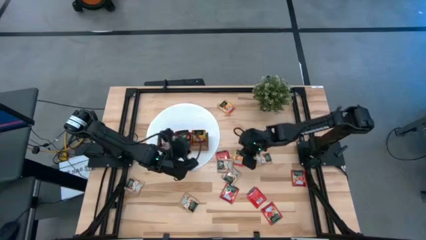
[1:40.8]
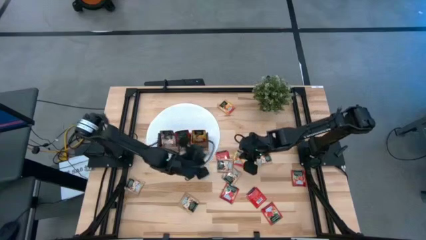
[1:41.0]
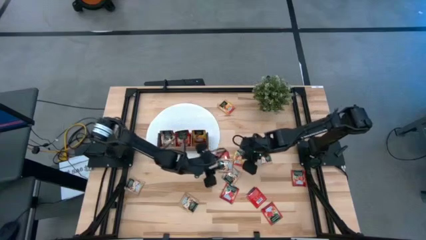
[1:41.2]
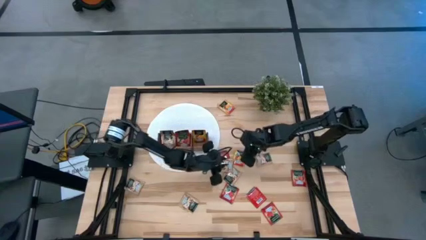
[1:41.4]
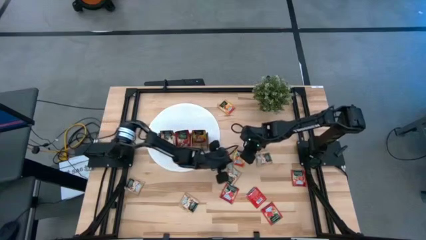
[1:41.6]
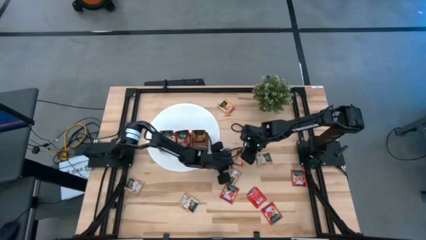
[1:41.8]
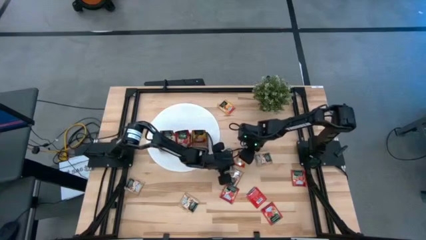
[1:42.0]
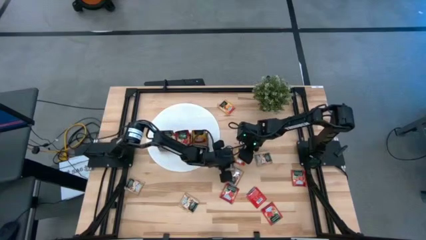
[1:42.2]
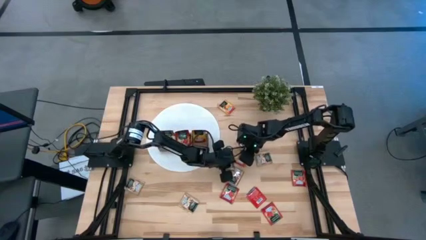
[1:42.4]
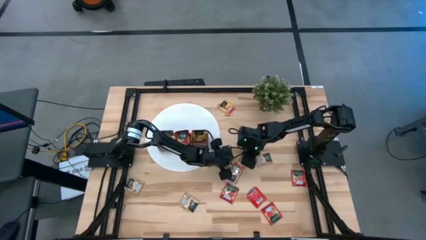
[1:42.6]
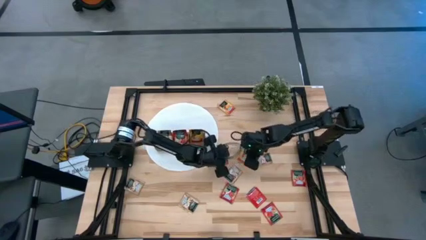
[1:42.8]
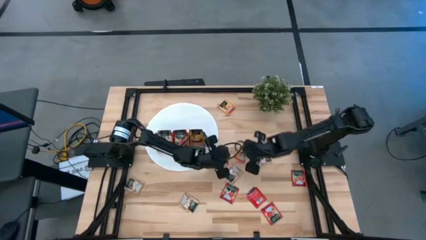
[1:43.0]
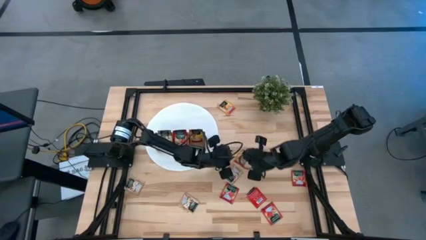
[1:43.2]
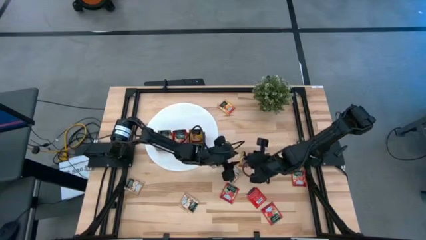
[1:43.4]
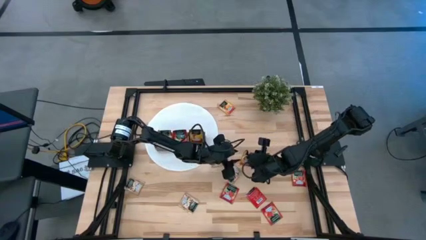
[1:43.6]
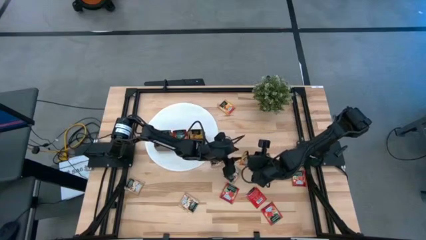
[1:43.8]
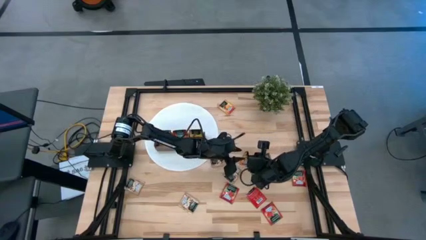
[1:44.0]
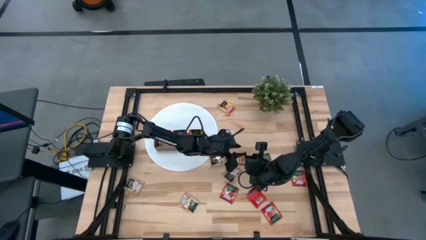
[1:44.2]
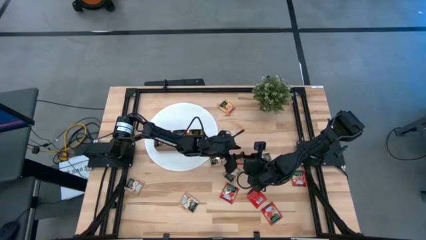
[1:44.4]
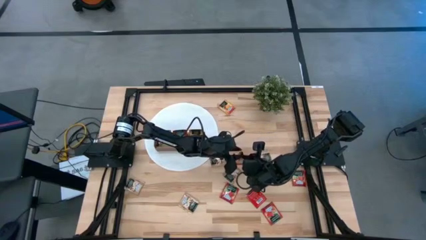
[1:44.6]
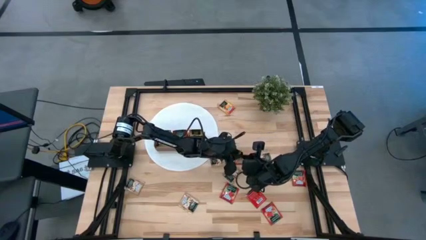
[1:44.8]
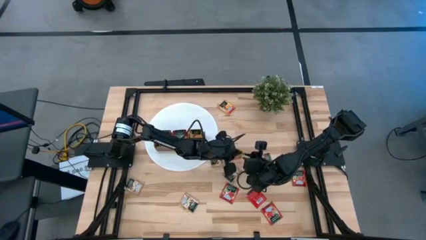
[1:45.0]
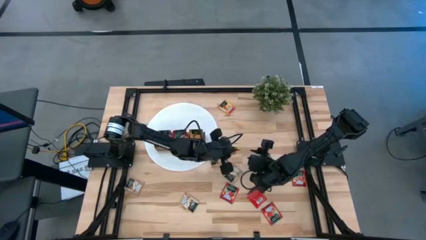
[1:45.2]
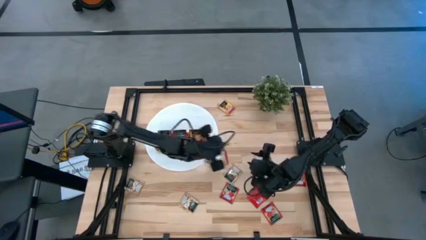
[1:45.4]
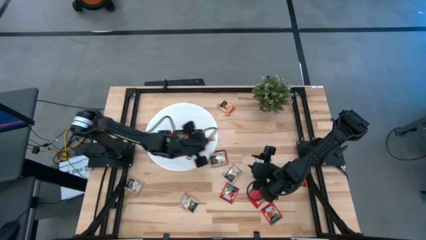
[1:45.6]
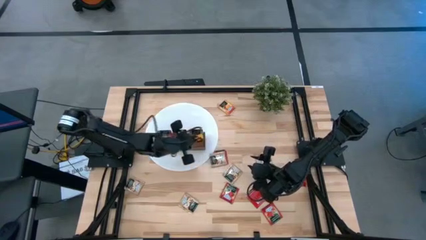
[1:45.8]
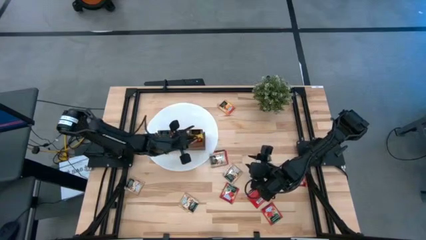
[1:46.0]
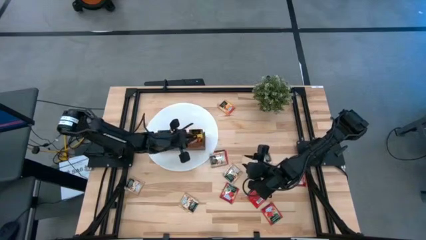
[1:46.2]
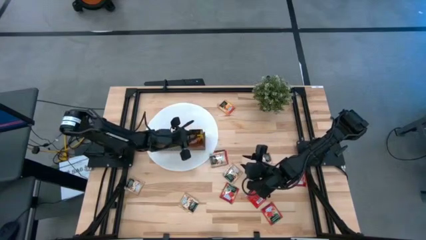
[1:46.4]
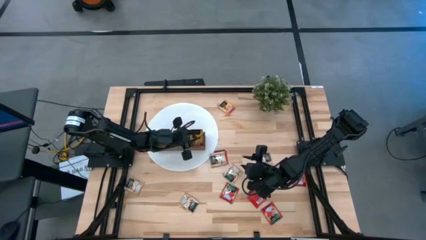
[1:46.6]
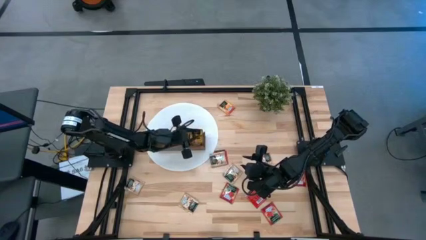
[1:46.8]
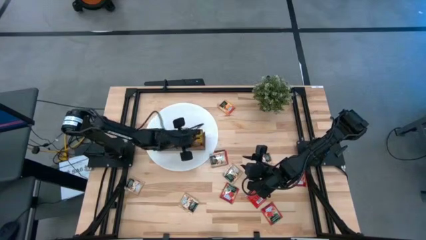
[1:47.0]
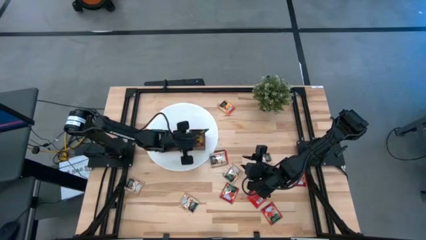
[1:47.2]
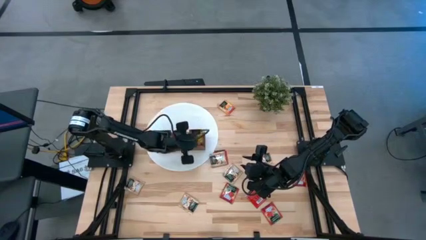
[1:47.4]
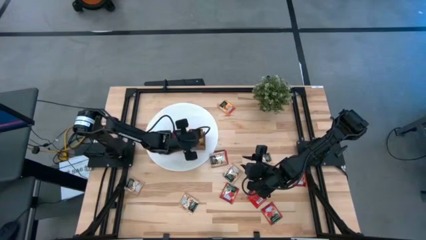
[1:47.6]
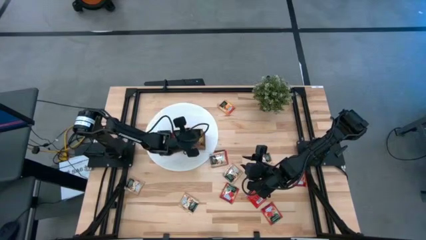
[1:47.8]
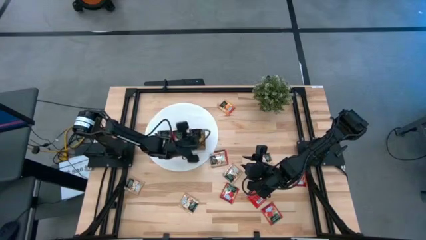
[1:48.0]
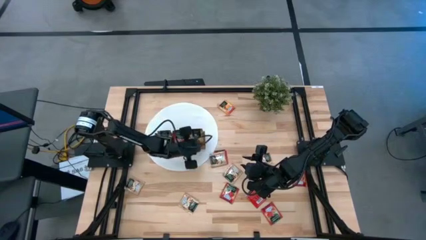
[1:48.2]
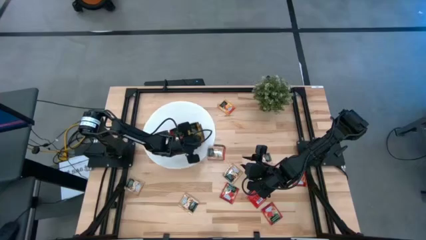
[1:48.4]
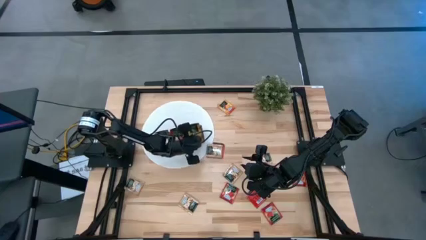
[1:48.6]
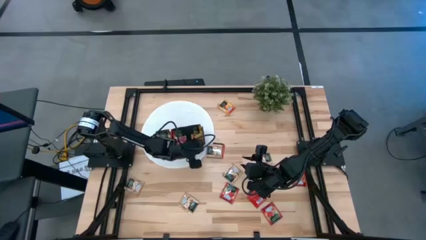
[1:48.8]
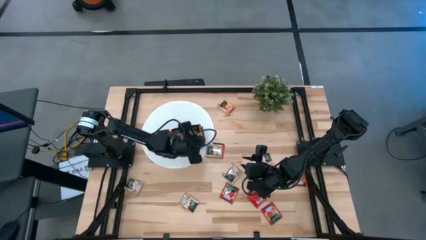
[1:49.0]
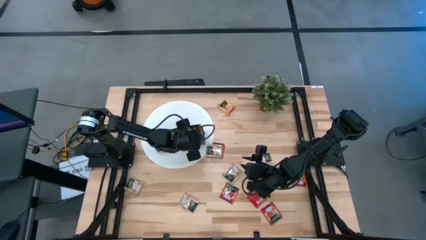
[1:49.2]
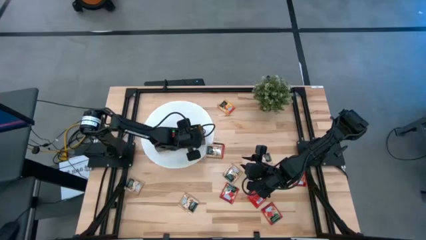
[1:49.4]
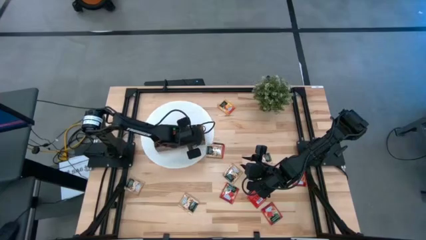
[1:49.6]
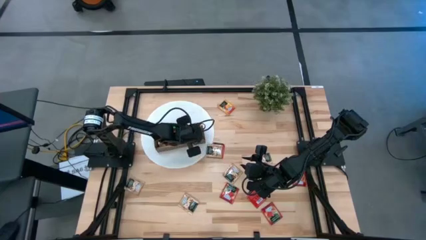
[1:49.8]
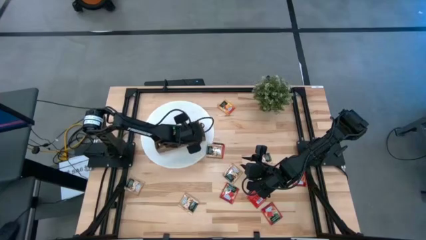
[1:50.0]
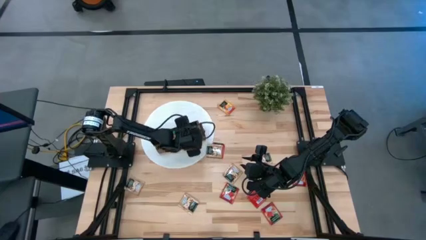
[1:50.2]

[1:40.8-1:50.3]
Task: Pick & Place Tea
Put the yellow tea bag into the right section of the wooden organizer

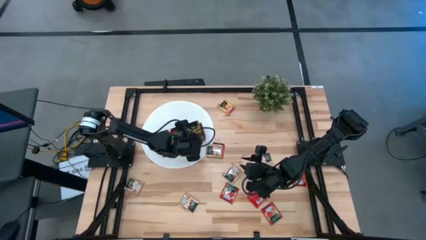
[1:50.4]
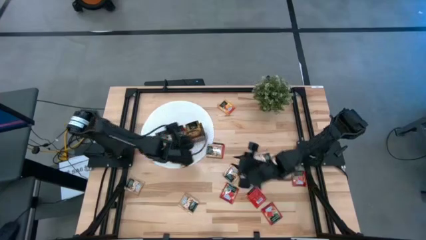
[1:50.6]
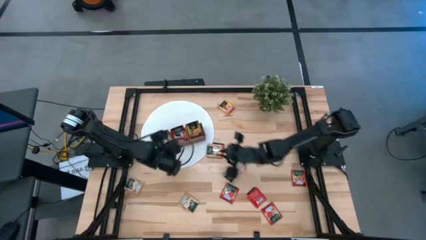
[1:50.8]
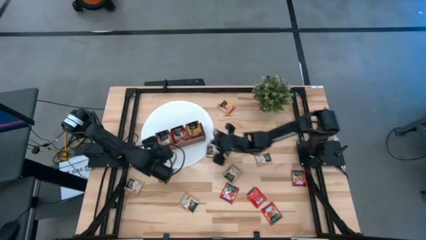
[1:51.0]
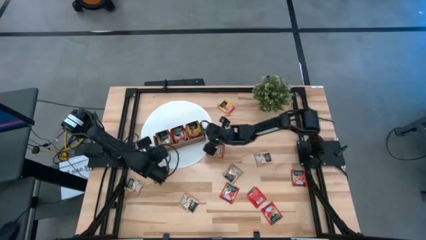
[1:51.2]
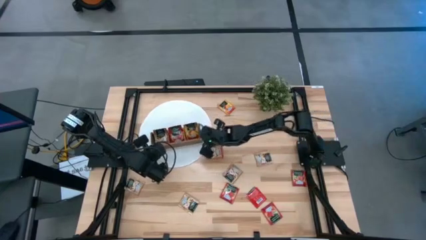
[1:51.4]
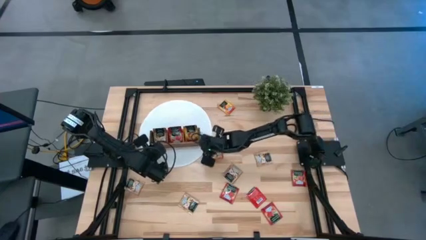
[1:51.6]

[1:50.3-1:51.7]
Adjust the wooden organizer

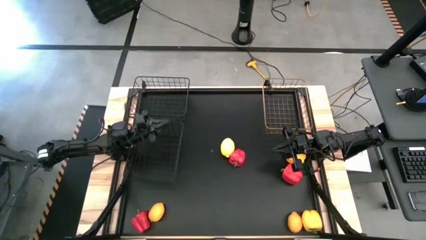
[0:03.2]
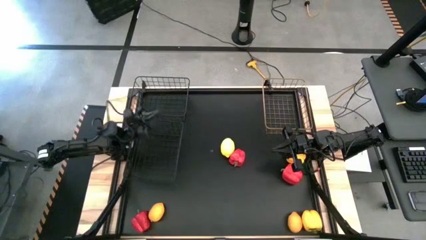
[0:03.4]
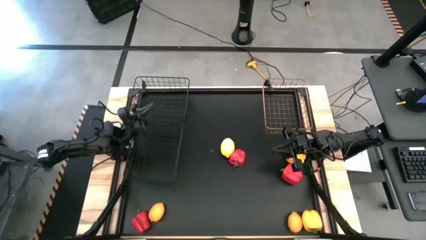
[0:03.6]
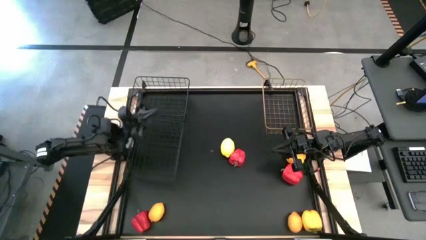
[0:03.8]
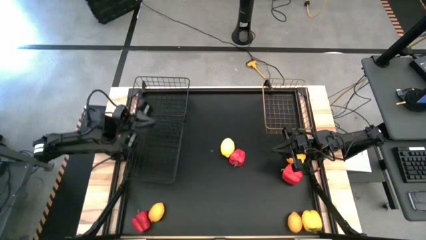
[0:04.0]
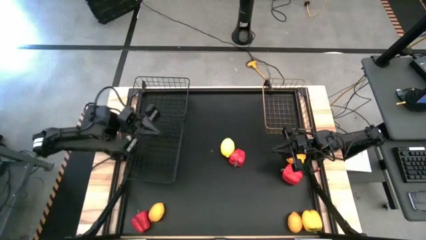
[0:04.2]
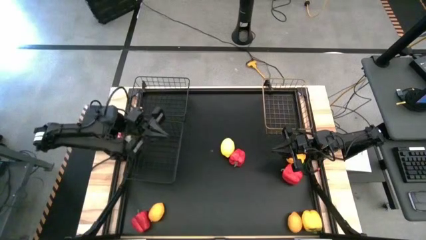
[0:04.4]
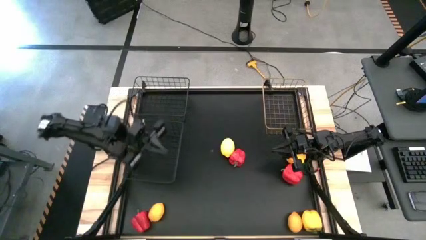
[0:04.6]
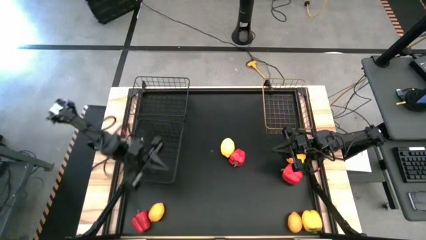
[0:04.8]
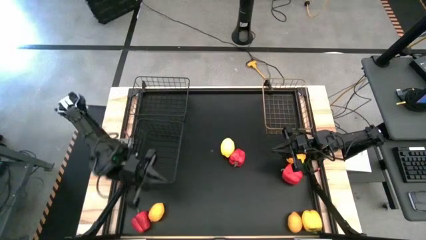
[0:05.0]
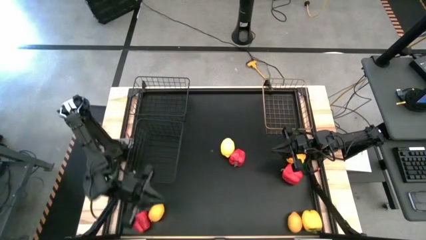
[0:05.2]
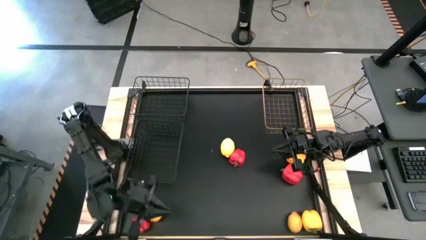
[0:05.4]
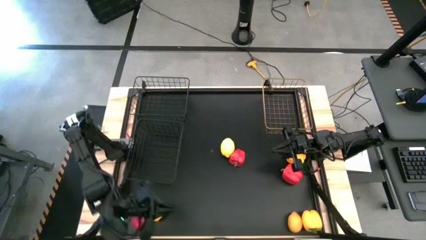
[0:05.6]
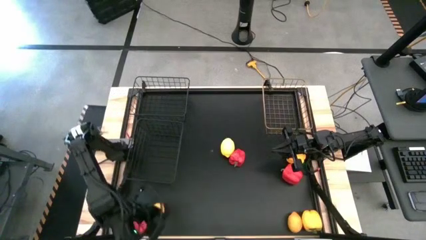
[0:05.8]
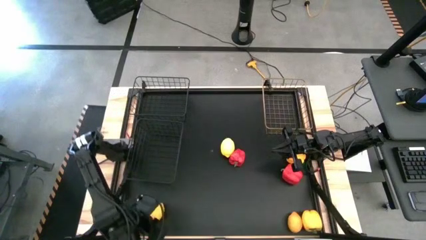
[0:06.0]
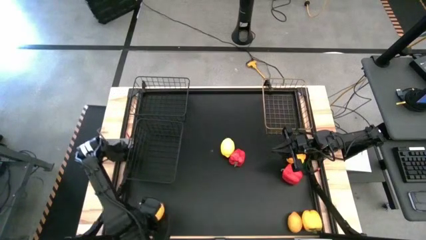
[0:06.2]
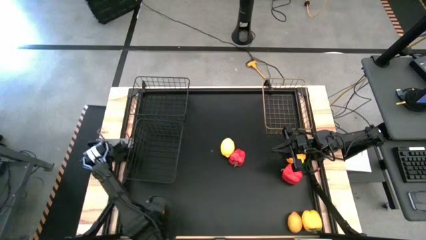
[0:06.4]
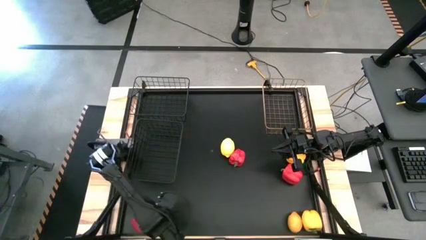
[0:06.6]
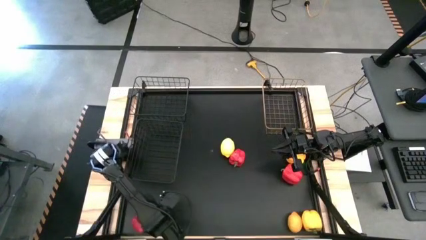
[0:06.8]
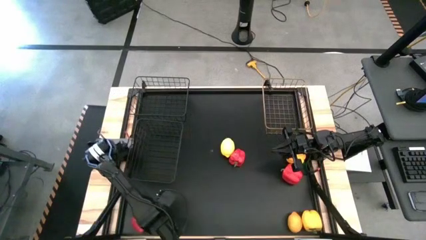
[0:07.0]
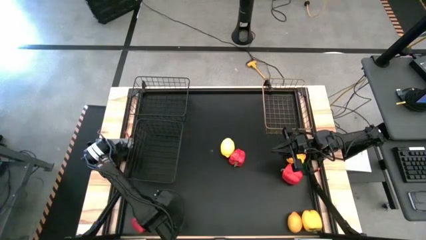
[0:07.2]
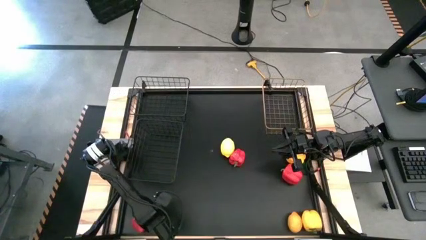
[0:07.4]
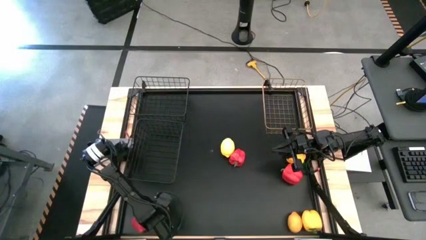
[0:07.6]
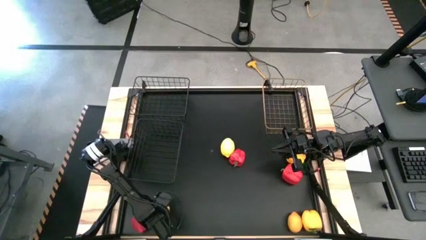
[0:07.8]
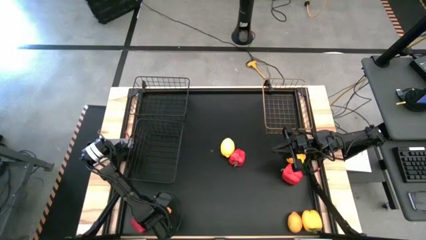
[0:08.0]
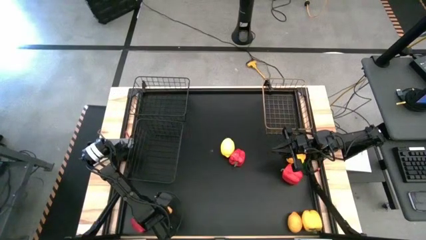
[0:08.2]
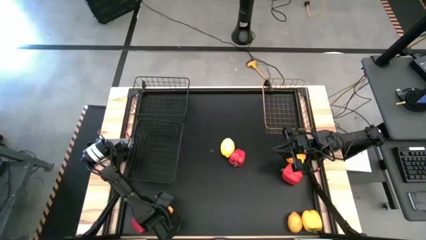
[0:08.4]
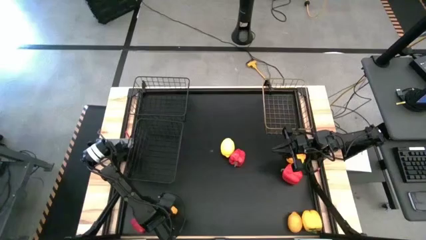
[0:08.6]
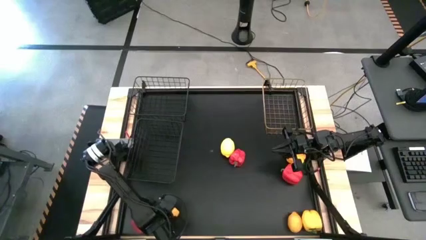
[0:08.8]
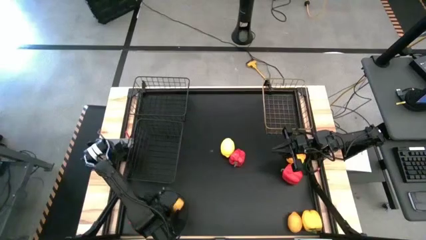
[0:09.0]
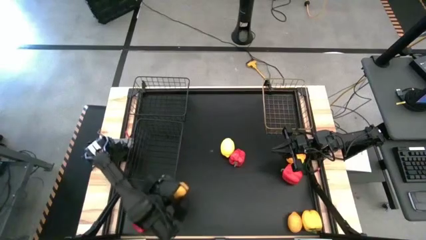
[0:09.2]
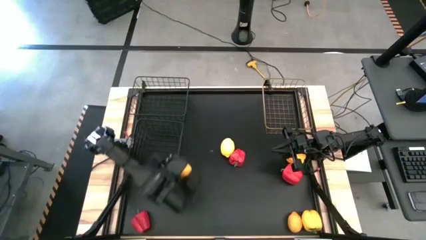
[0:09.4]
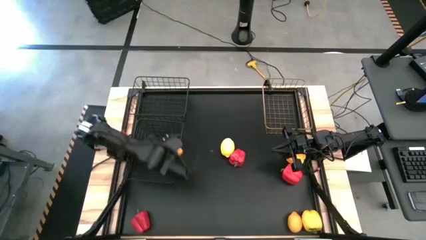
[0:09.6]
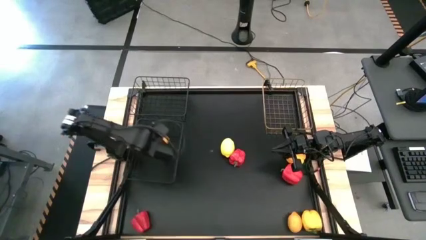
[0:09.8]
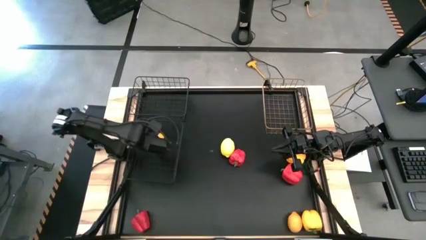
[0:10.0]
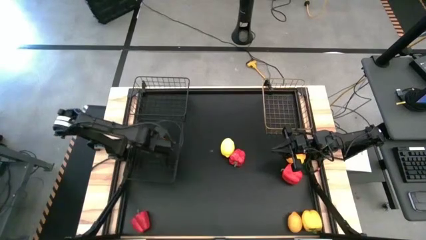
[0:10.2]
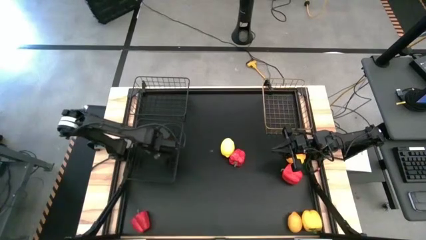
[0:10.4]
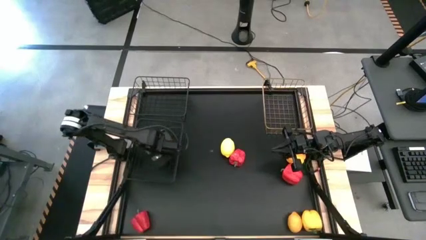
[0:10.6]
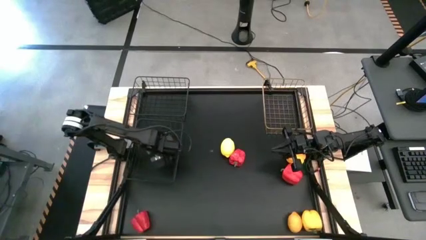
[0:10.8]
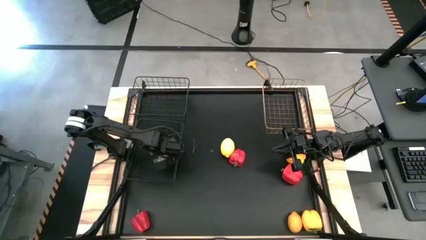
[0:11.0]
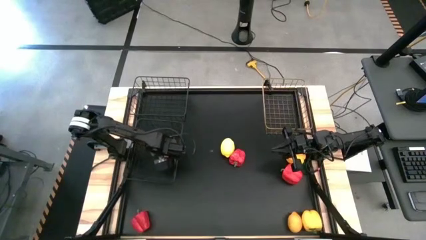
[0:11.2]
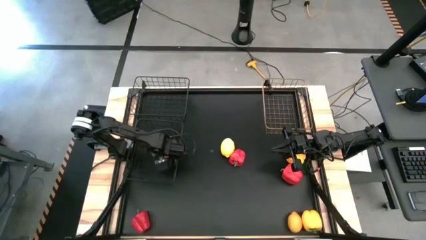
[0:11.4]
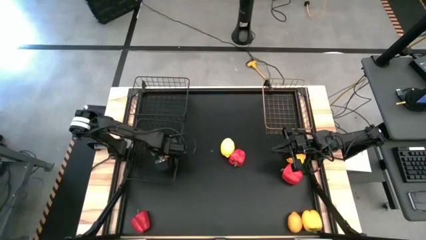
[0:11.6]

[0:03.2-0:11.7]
Task: Sort produce into baskets
Put the bottom left lemon into the bottom black wire basket
